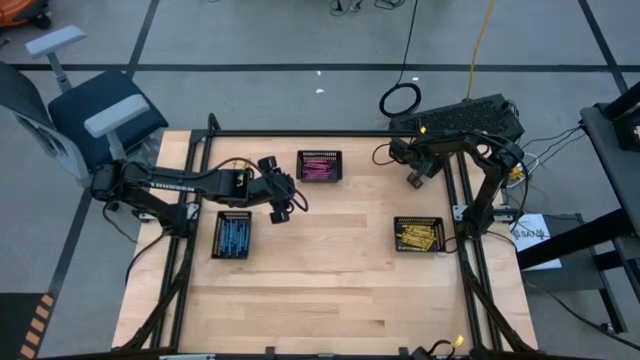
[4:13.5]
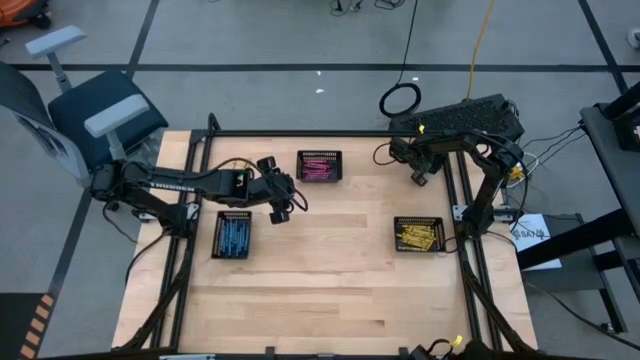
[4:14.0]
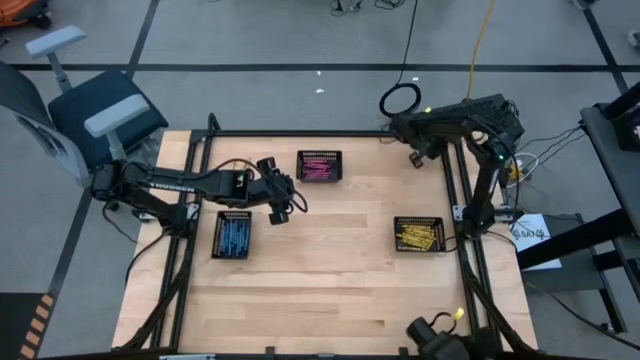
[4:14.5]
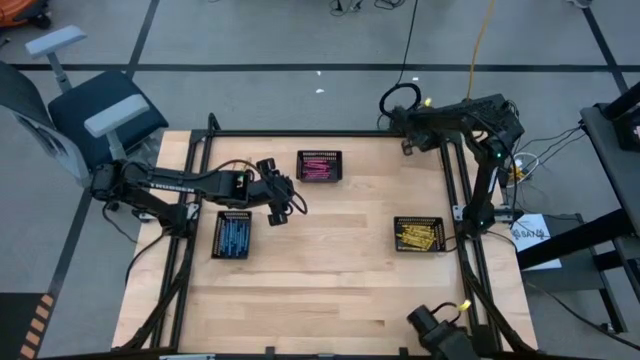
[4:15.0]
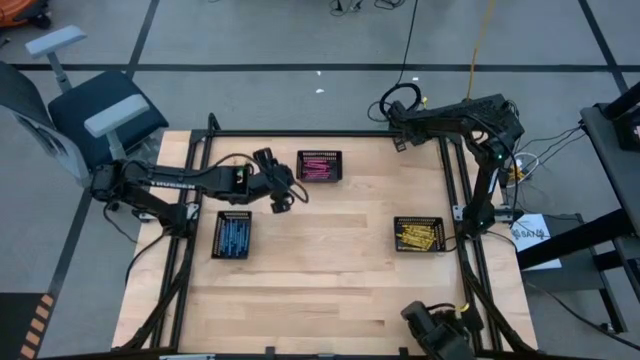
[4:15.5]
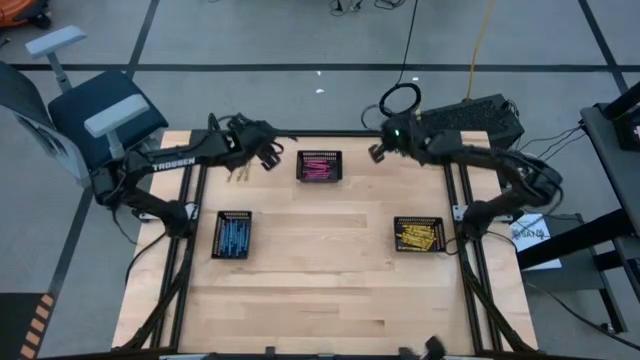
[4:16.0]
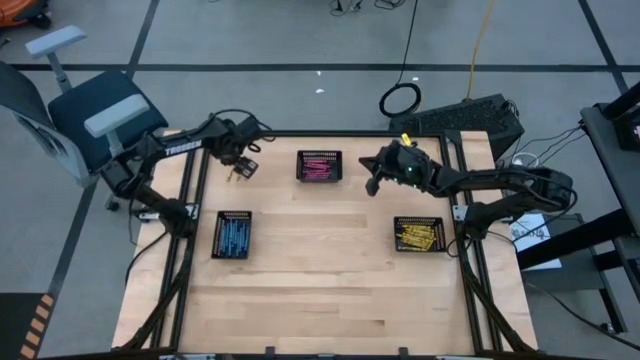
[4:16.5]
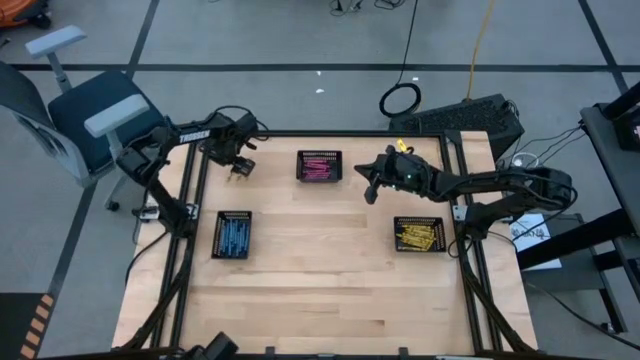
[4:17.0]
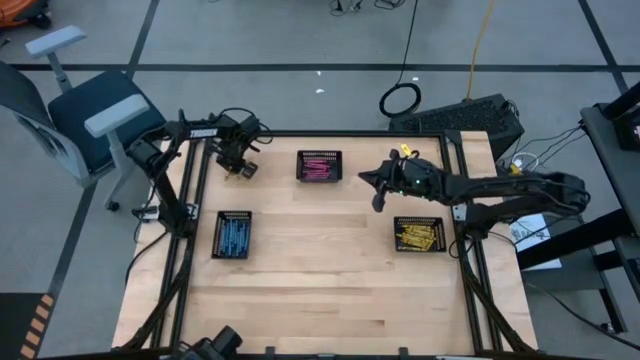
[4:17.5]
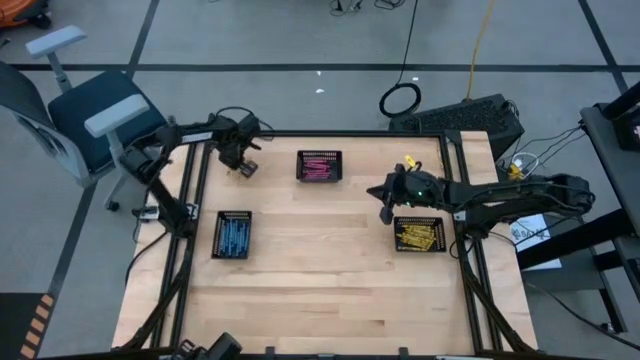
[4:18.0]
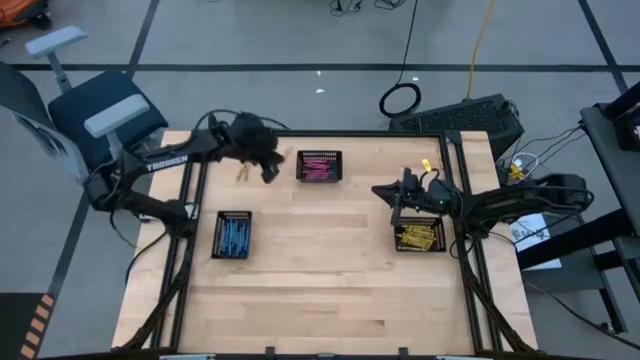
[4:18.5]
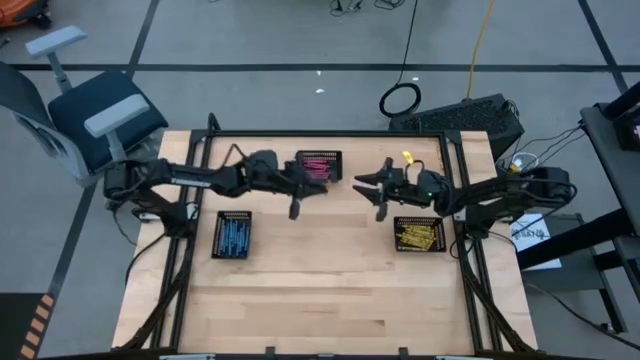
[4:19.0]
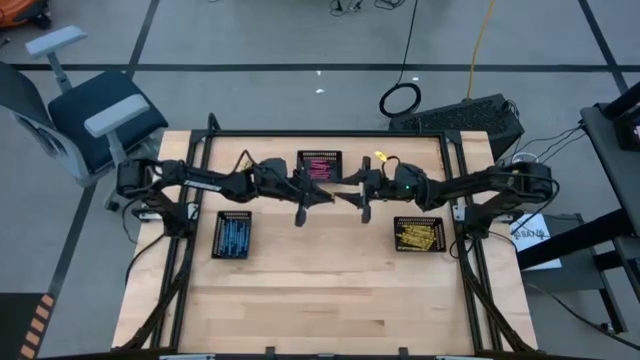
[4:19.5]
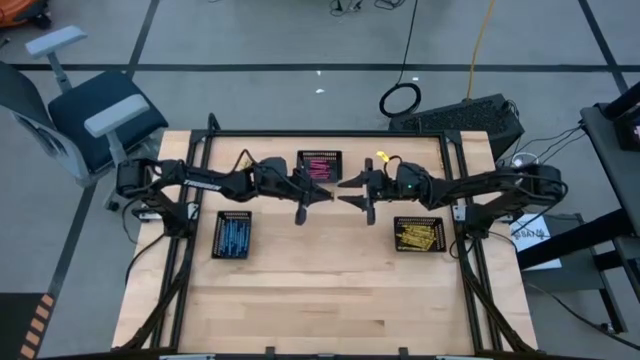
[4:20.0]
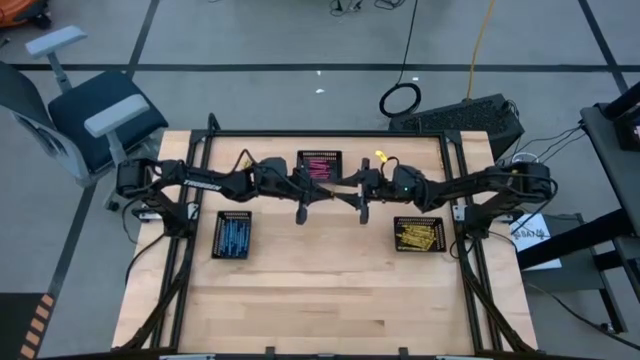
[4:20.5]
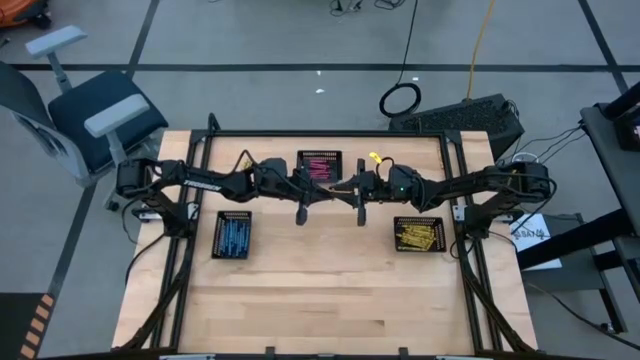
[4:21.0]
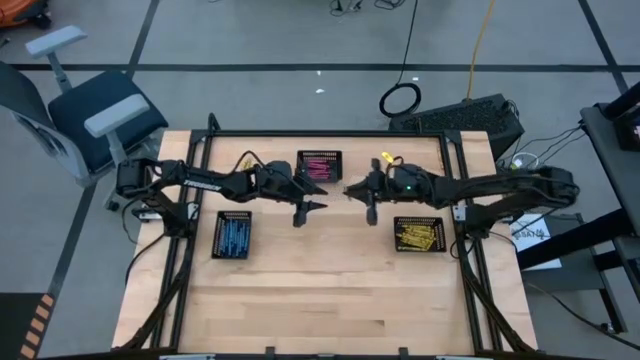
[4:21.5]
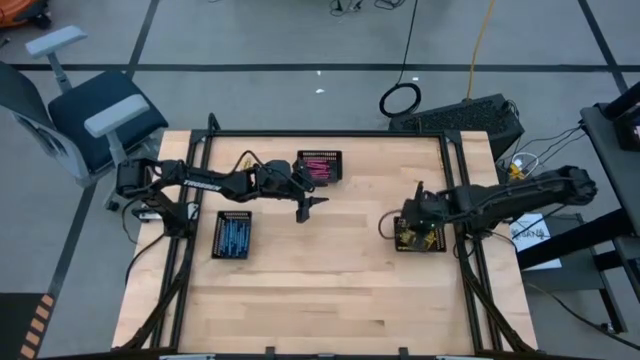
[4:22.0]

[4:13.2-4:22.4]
Task: Sort crayons
Put the yellow crayon into the bottom right black bin

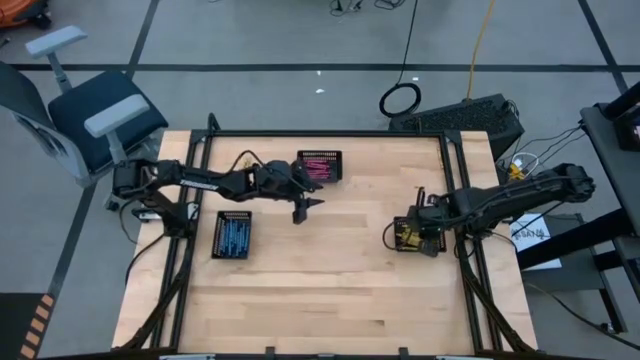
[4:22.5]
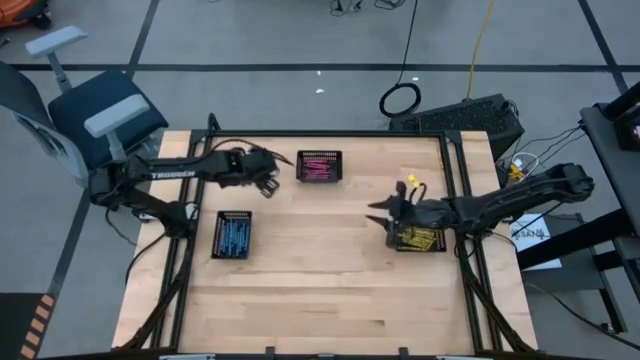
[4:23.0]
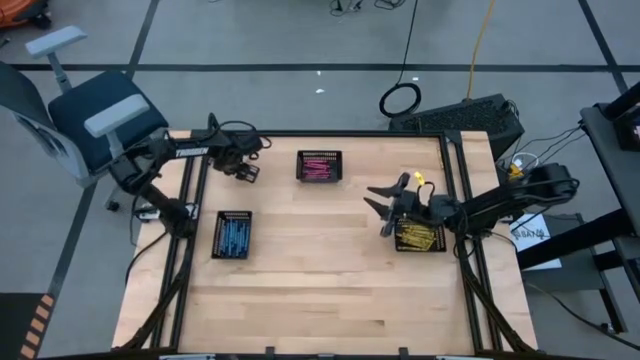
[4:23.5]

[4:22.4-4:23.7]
Put the left yellow crayon into the bottom right black bin

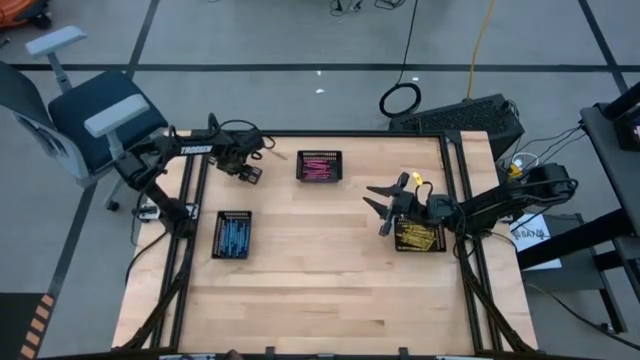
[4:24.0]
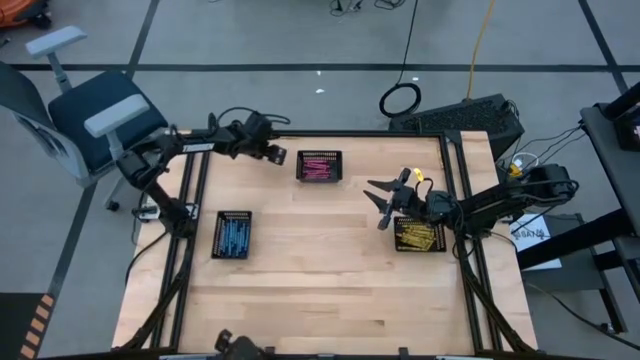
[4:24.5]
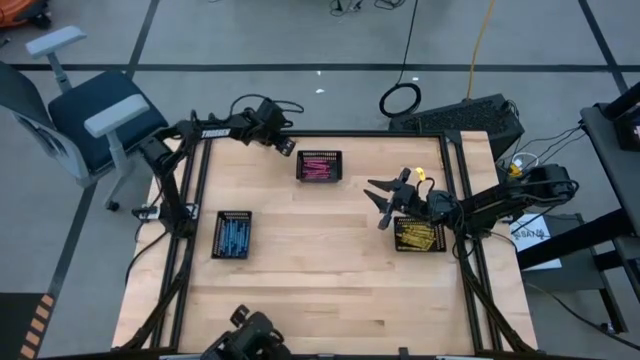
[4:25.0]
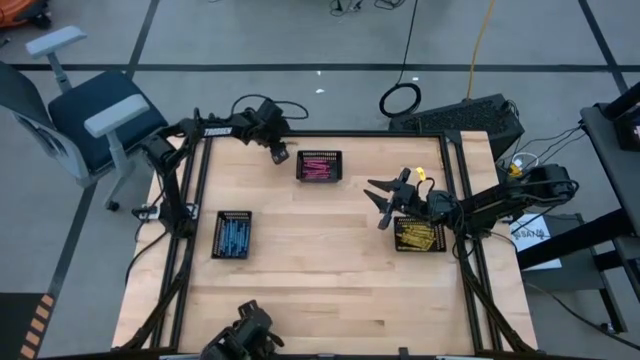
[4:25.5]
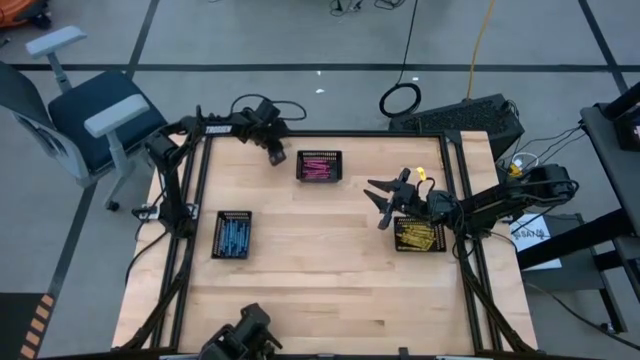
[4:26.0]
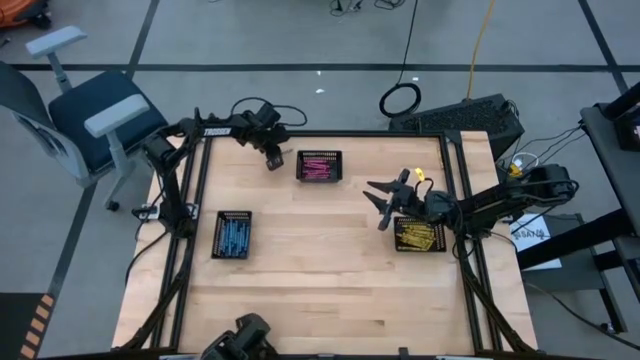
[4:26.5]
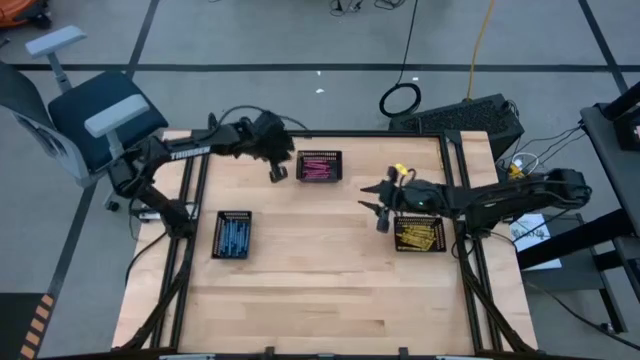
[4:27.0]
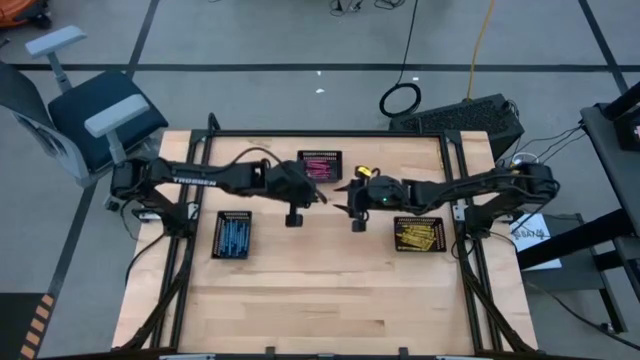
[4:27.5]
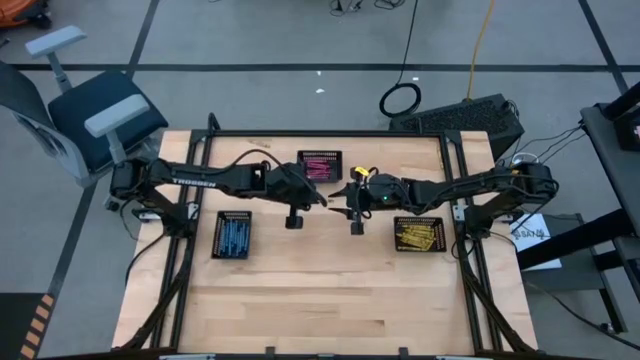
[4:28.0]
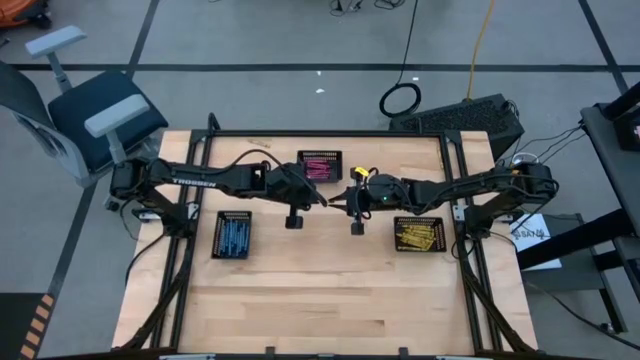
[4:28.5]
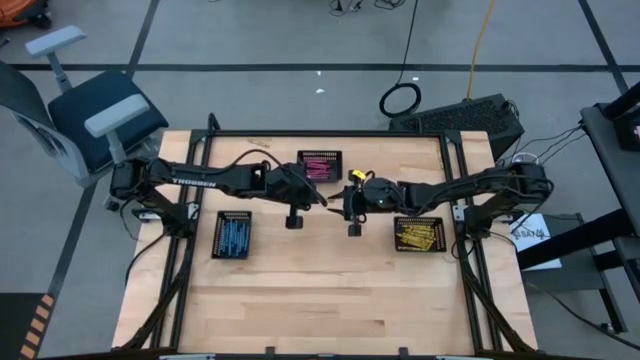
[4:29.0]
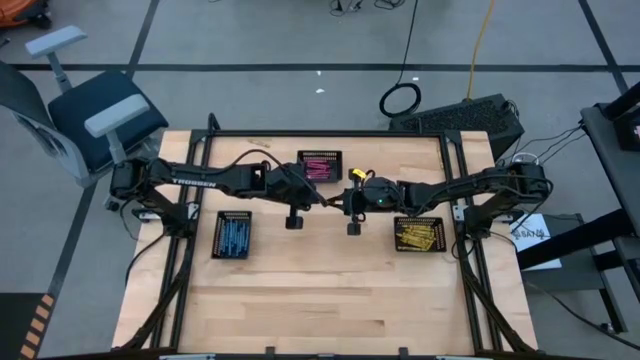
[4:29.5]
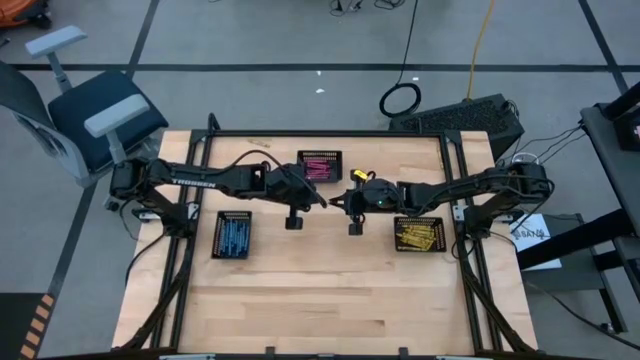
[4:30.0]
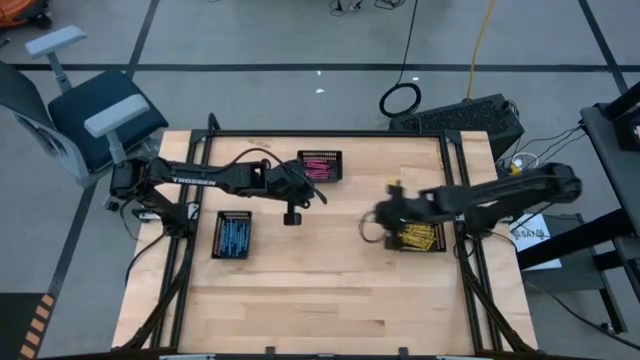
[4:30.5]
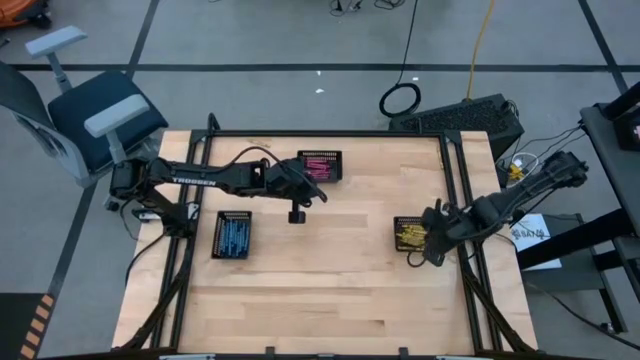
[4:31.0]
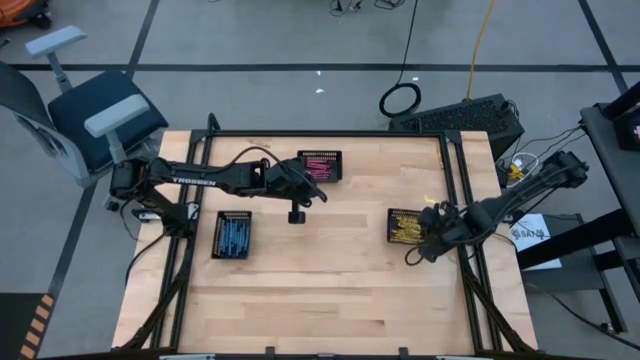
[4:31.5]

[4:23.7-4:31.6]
Put the middle yellow crayon into the bottom right black bin

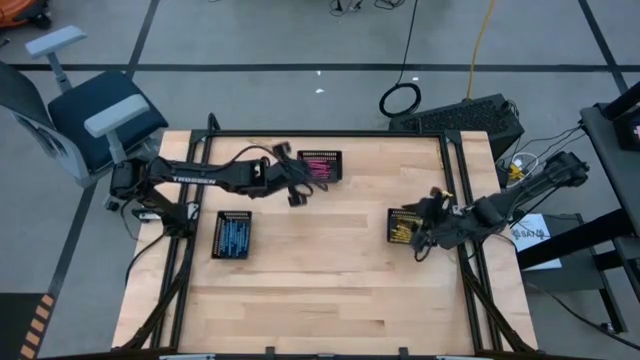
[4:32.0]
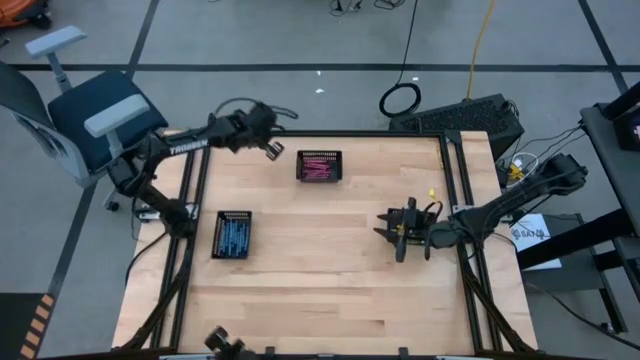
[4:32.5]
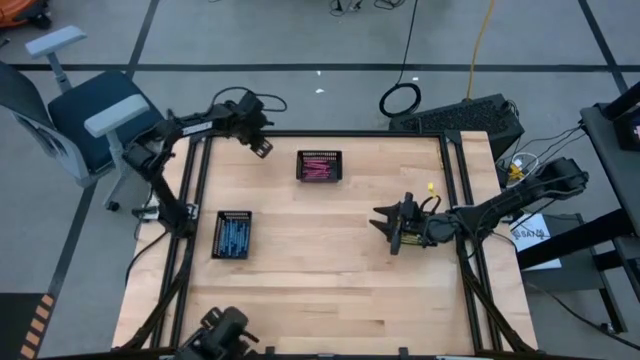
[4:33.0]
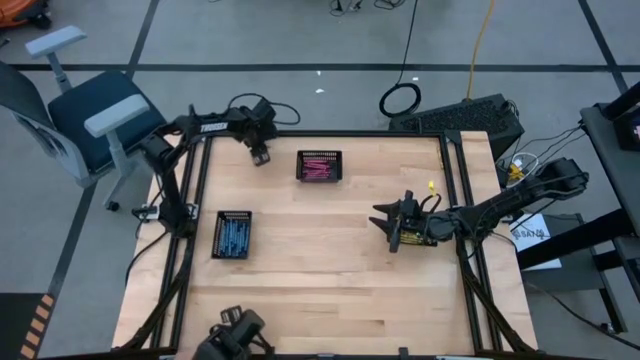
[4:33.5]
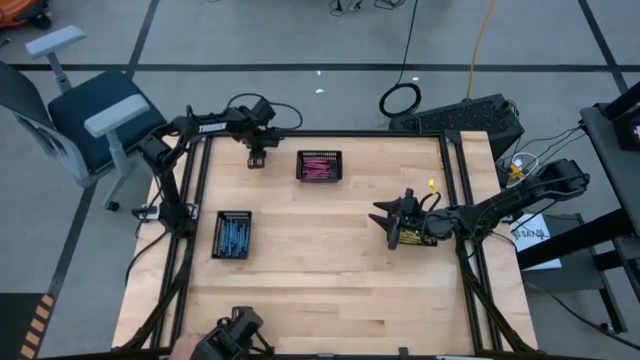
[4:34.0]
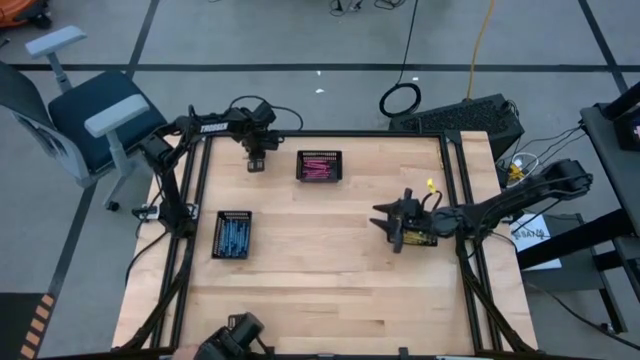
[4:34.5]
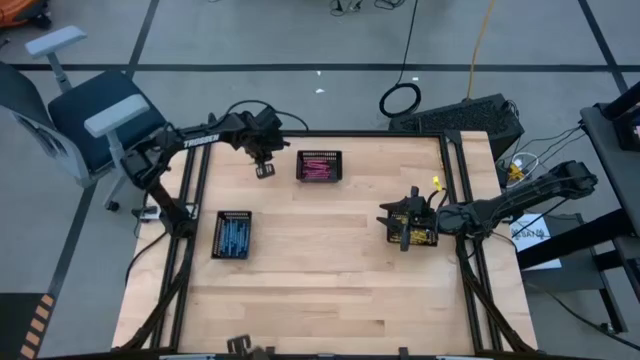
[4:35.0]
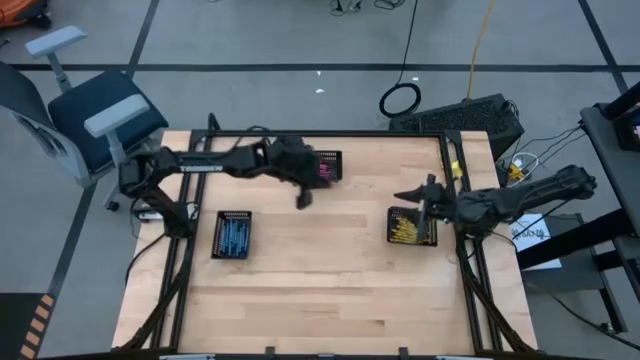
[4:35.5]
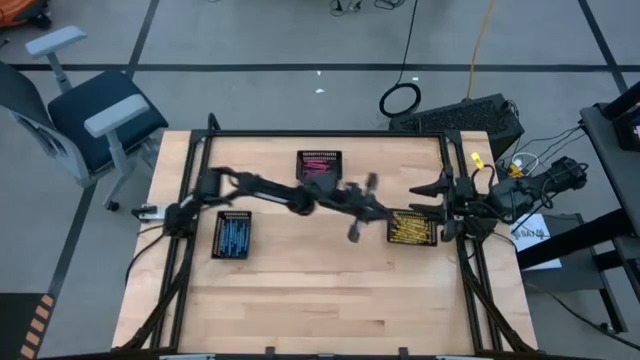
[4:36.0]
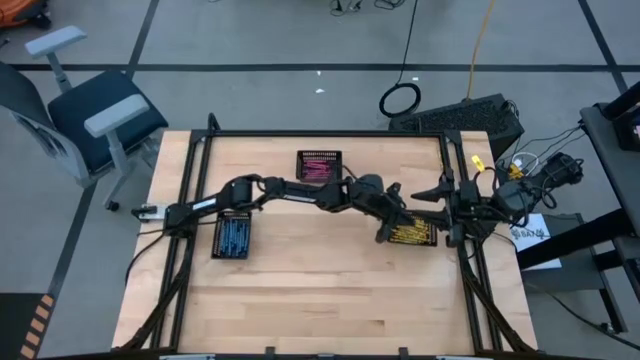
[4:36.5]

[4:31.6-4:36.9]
Put the left yellow crayon into the bottom right black bin
